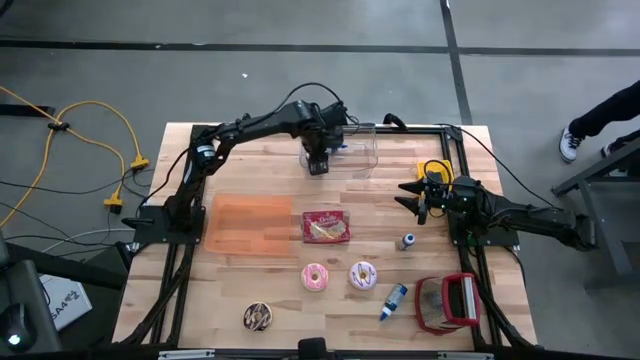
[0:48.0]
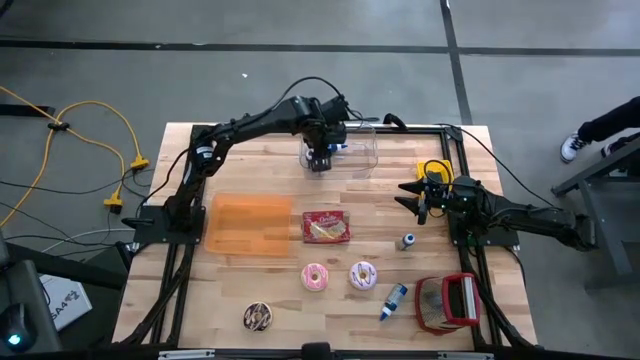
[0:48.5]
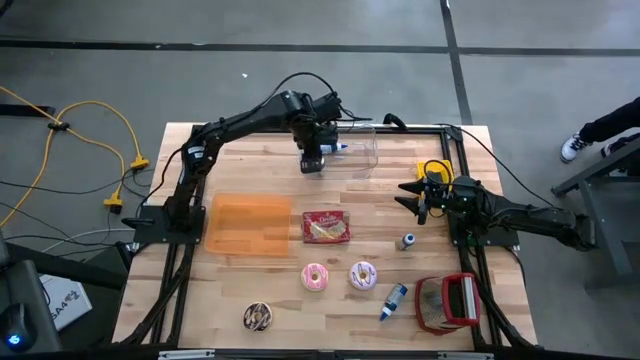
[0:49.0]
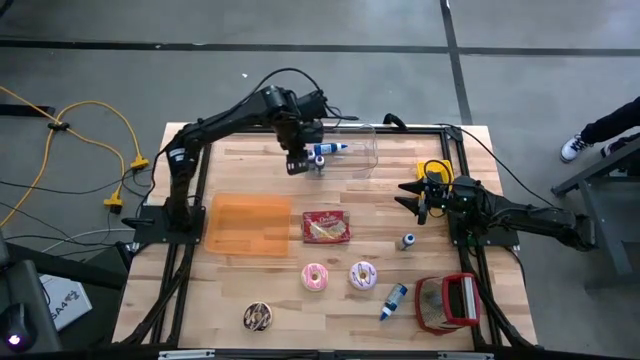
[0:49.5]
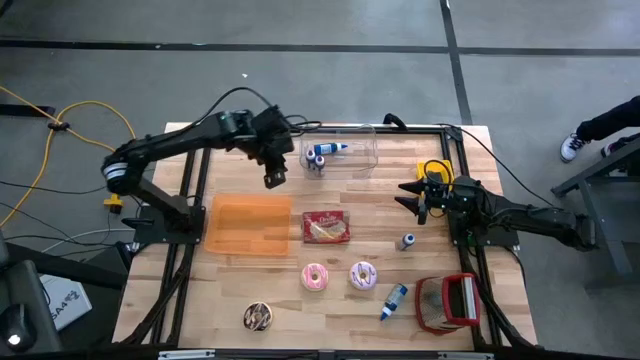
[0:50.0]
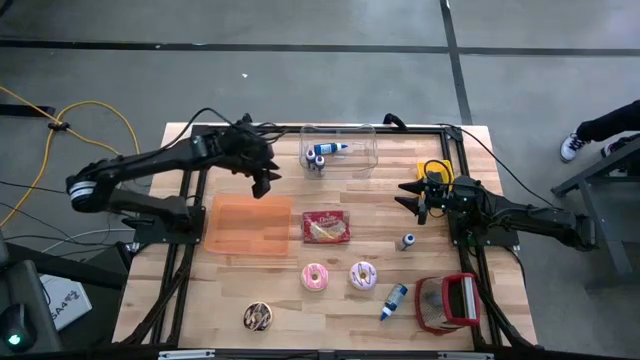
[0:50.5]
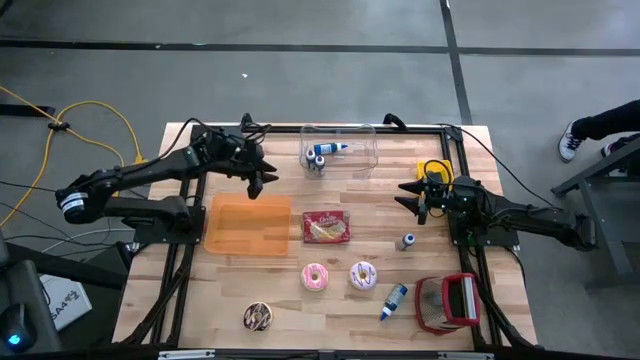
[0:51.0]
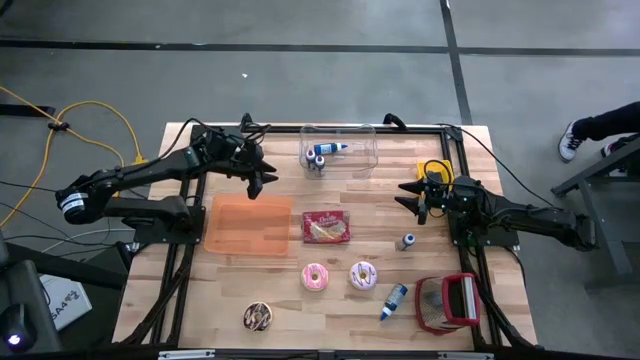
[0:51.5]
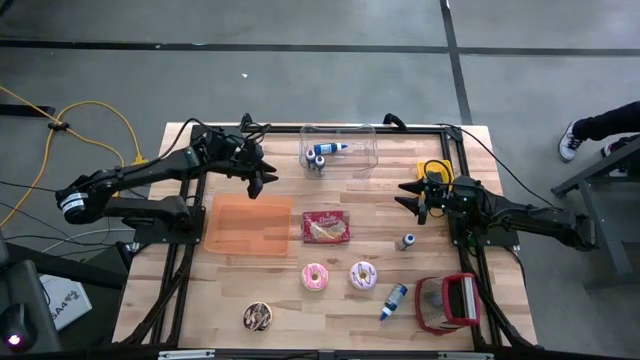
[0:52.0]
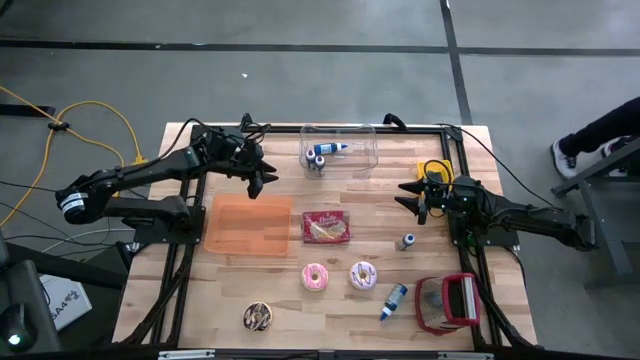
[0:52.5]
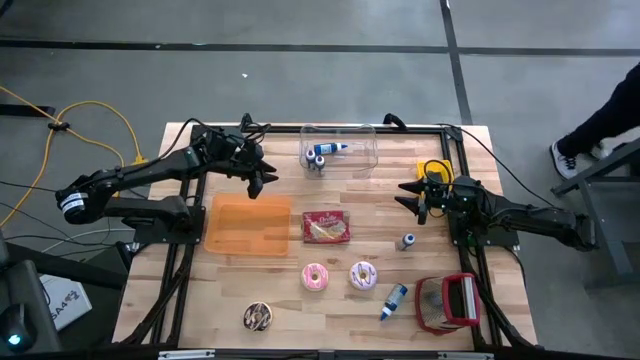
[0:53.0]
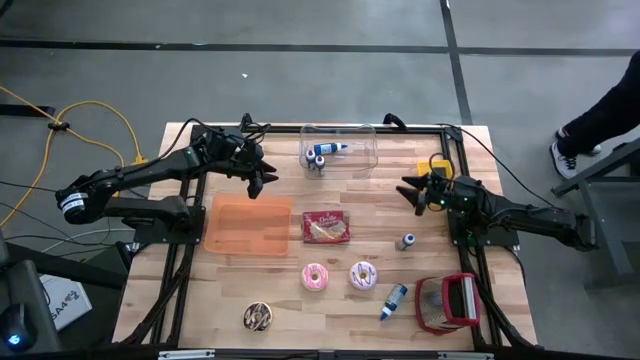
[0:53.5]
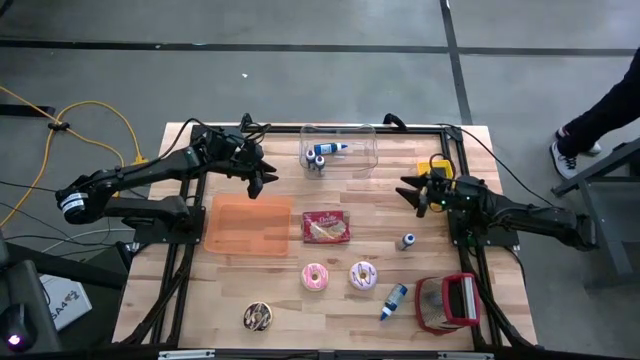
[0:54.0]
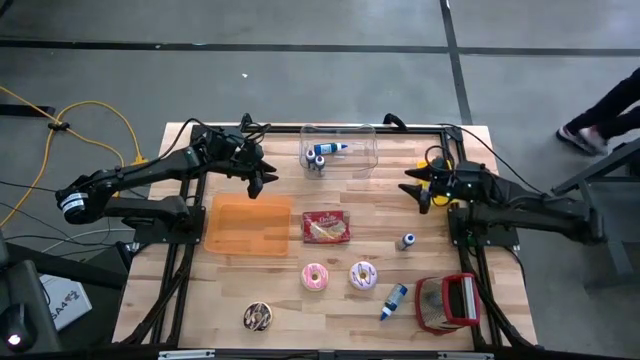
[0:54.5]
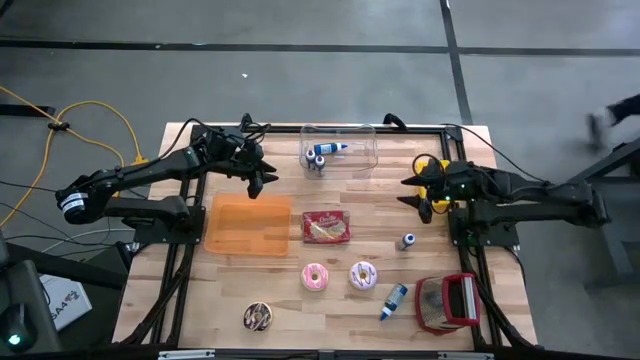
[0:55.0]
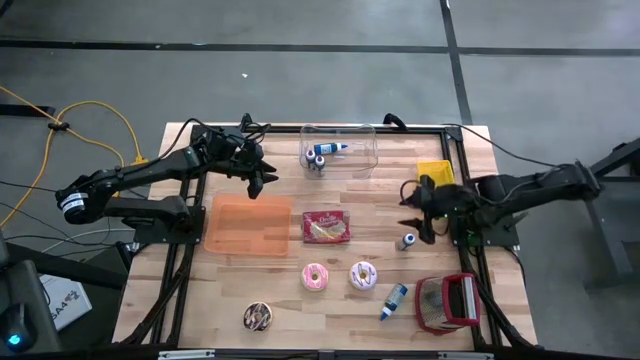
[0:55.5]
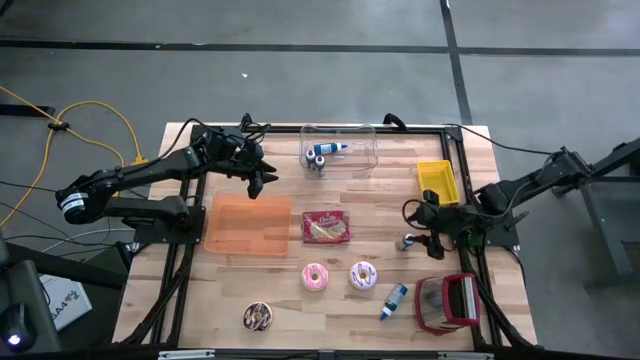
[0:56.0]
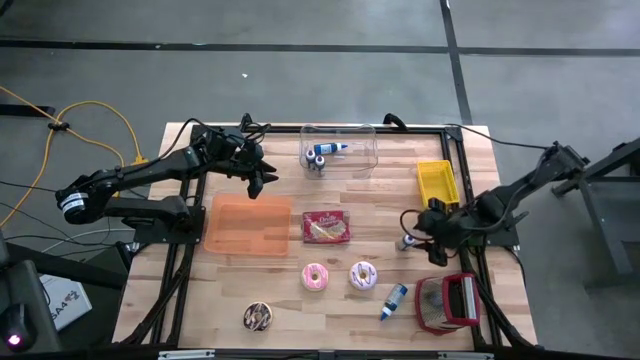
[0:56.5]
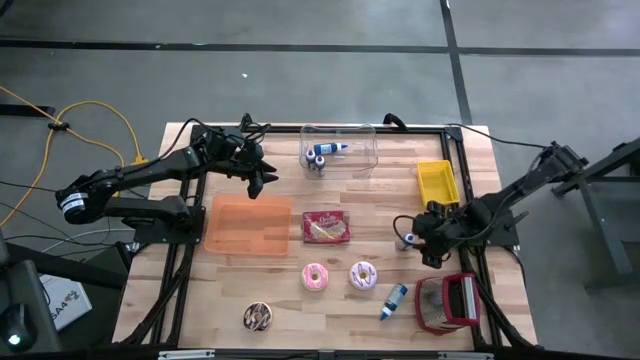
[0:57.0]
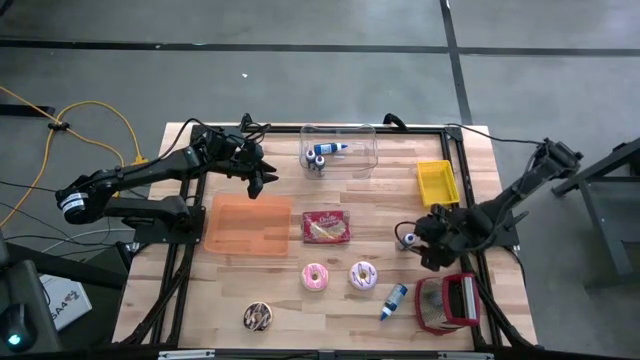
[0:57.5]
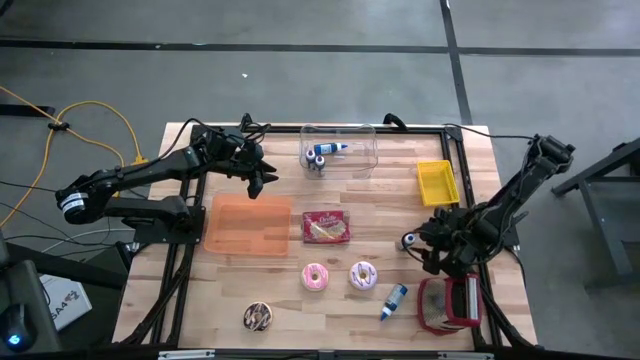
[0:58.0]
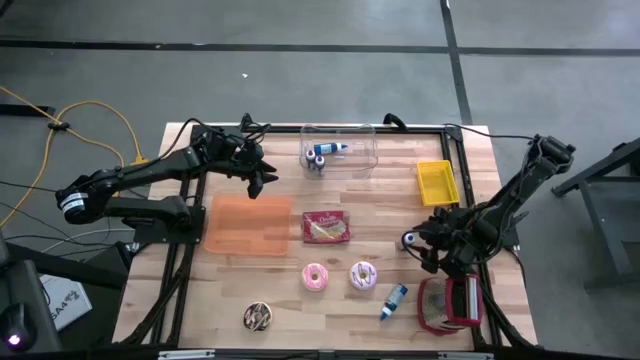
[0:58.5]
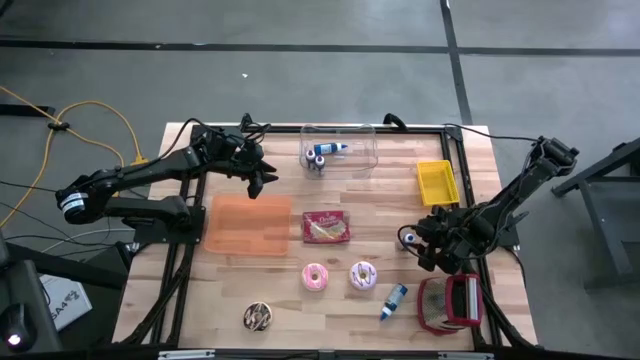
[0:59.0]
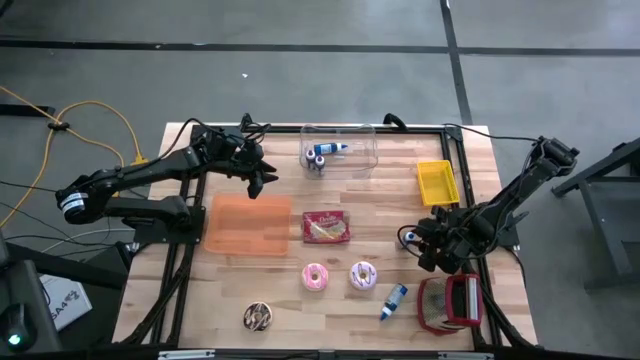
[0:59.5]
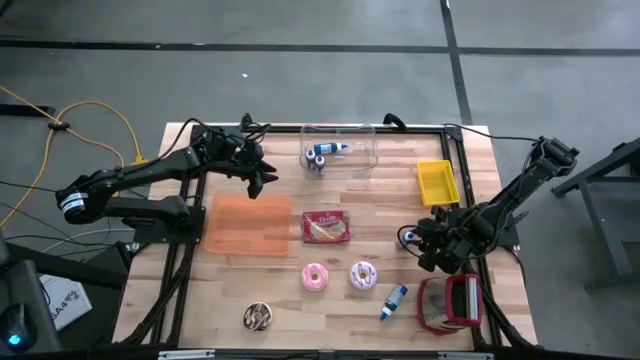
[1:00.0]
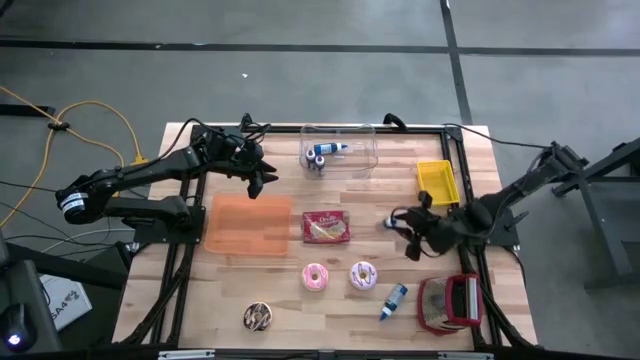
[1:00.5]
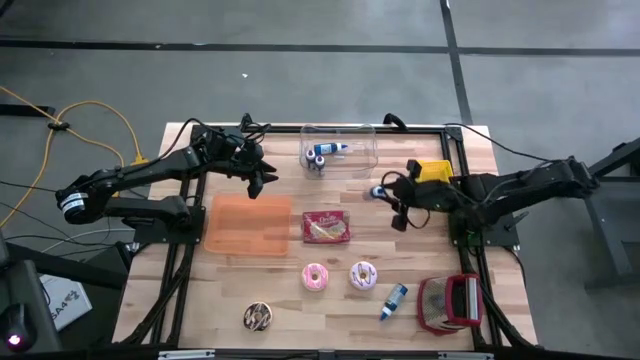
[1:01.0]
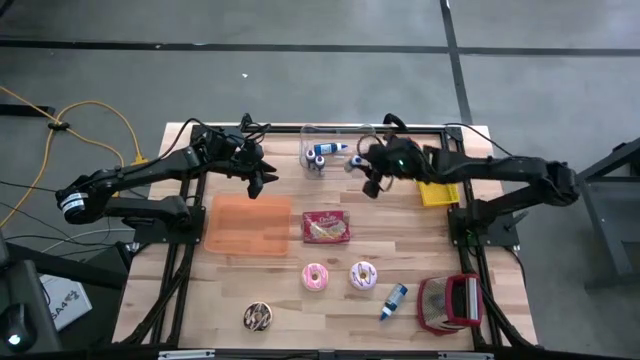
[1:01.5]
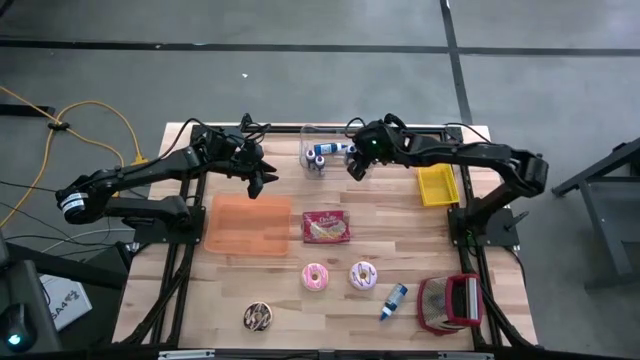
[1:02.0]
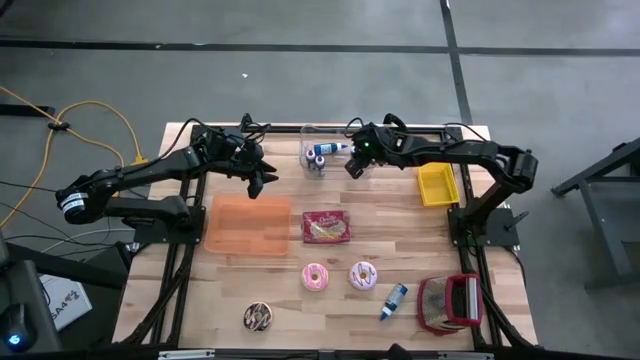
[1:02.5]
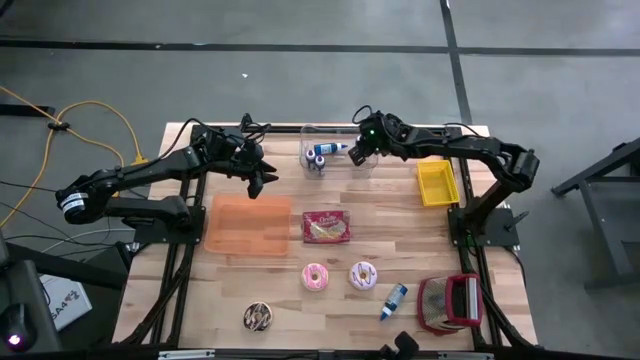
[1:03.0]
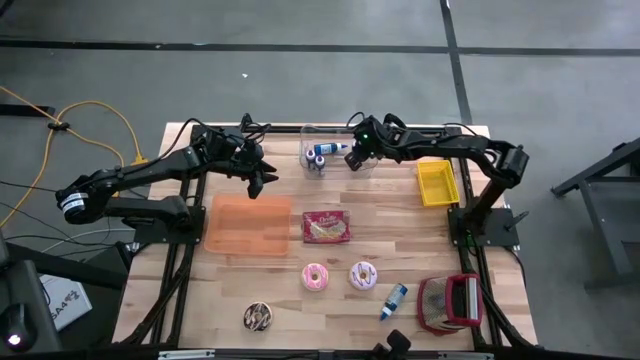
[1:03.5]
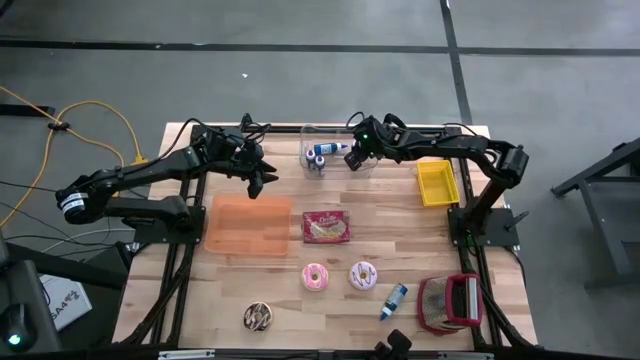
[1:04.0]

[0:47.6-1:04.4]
Put the top blue food coloring bottle into the transparent bin

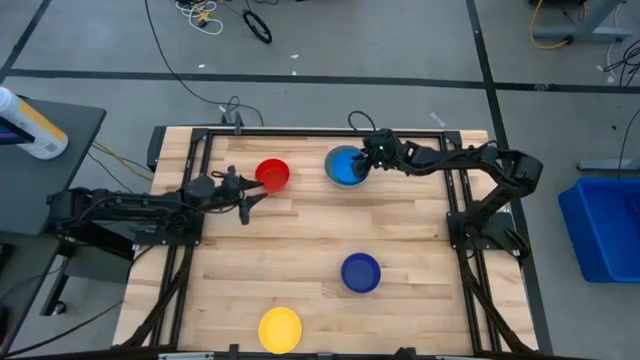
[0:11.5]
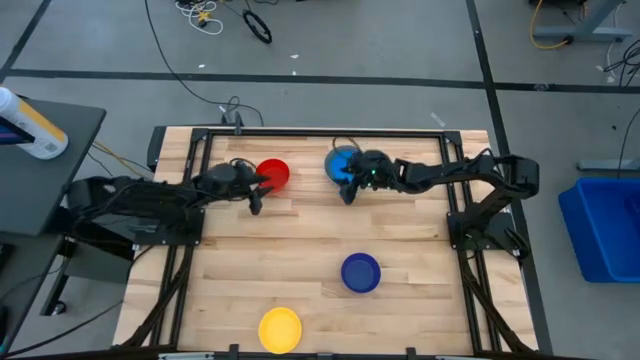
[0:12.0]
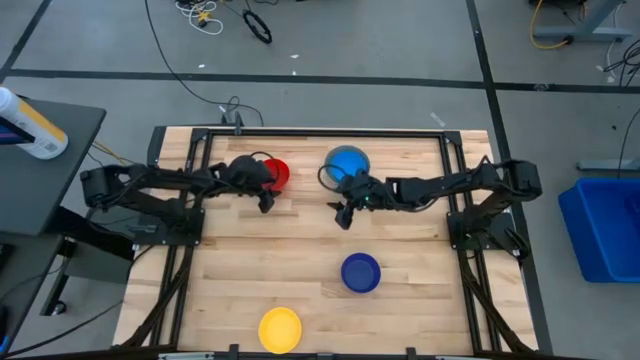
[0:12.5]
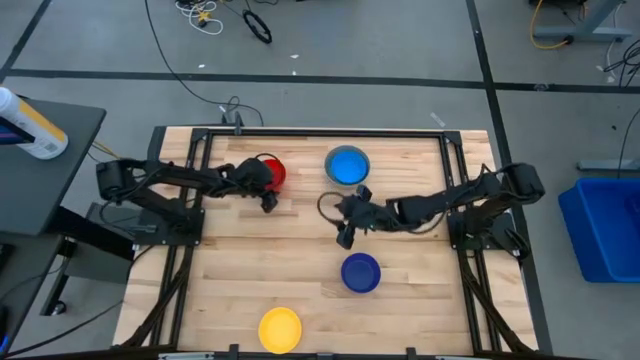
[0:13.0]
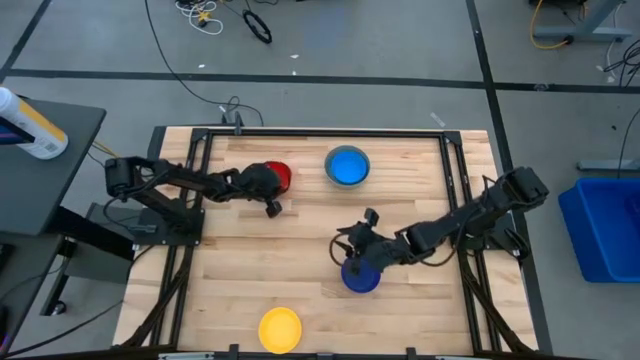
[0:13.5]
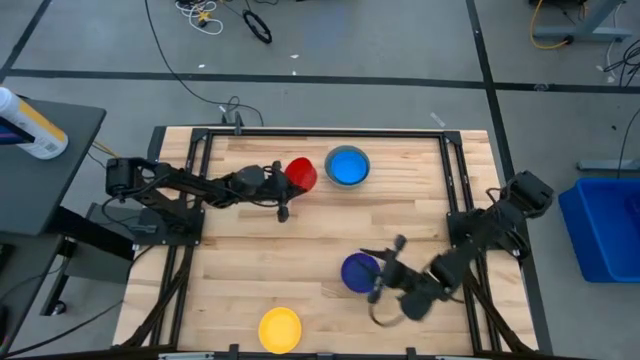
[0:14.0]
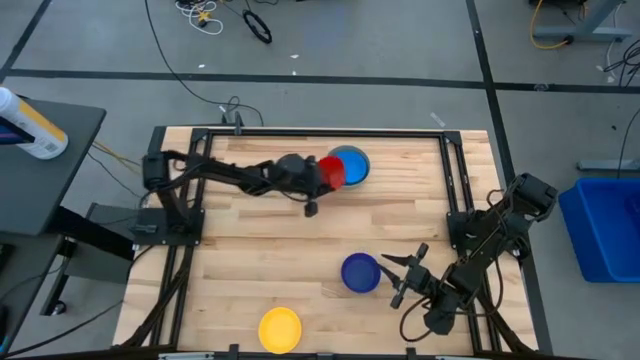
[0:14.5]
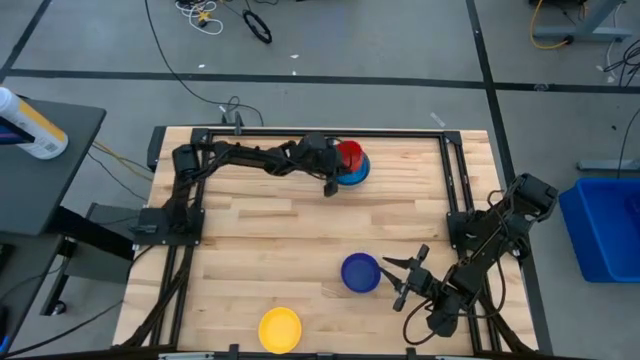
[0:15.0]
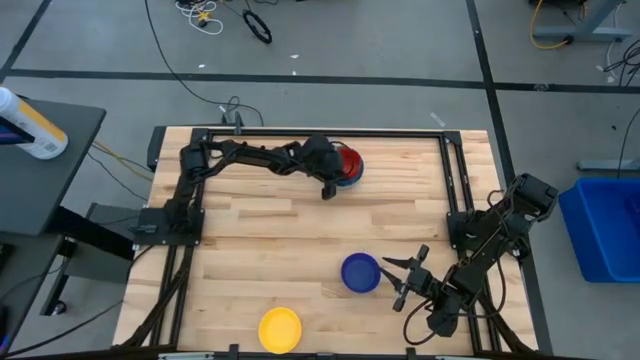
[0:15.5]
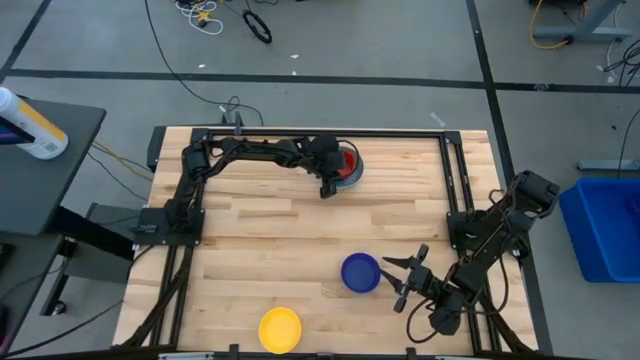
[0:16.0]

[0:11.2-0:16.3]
Stack the red bowl in the light blue bowl
